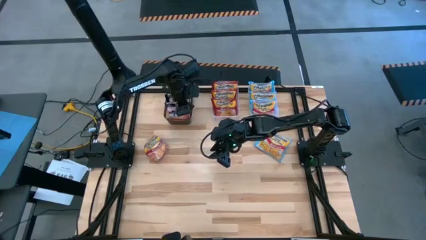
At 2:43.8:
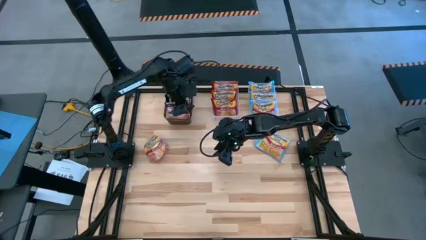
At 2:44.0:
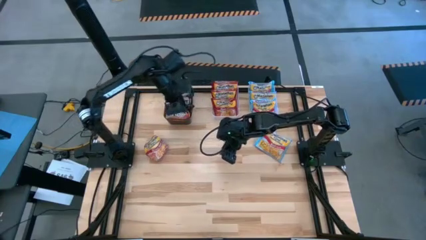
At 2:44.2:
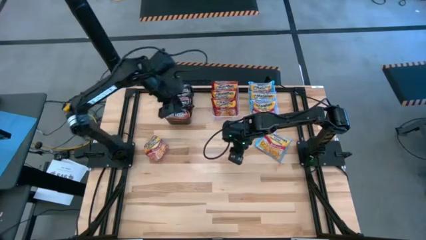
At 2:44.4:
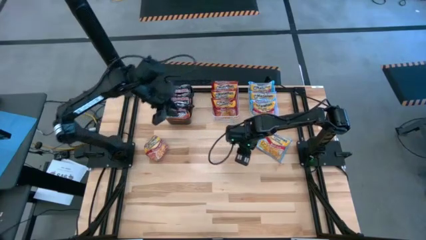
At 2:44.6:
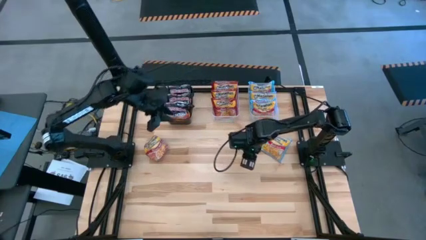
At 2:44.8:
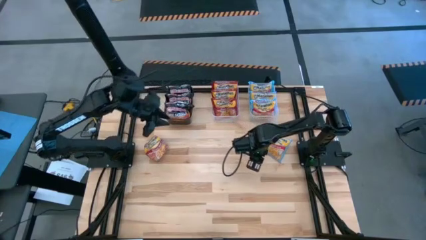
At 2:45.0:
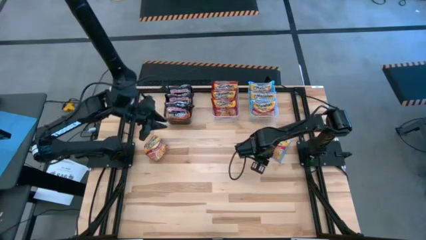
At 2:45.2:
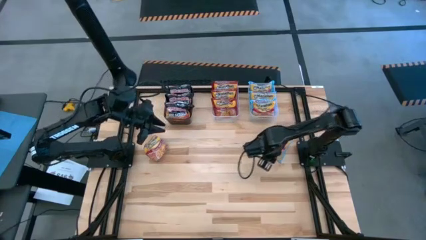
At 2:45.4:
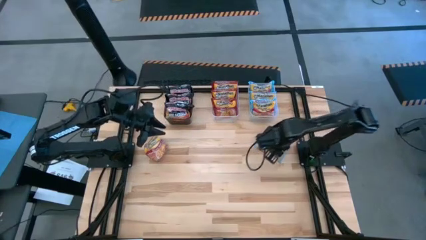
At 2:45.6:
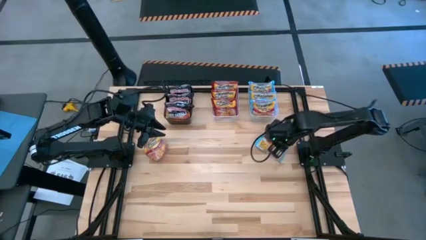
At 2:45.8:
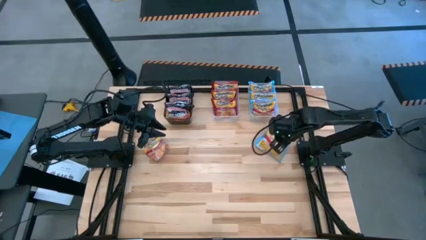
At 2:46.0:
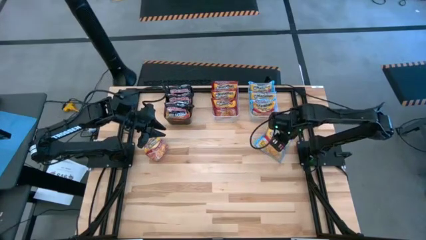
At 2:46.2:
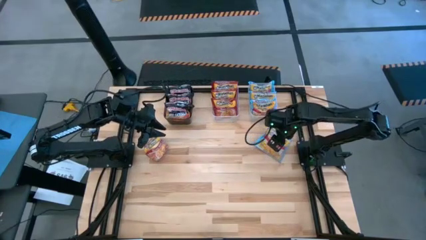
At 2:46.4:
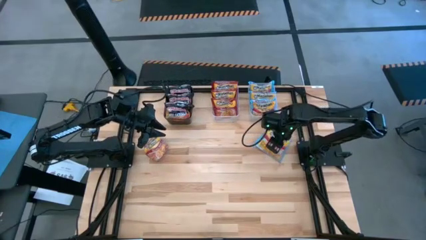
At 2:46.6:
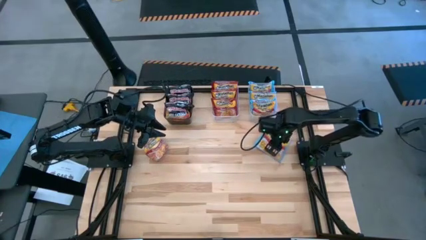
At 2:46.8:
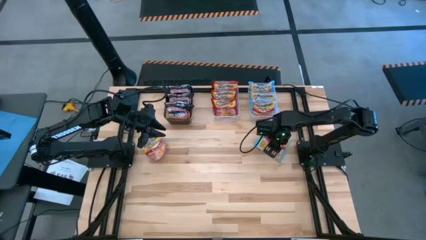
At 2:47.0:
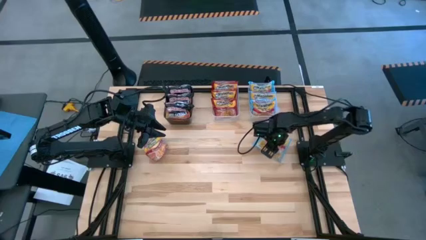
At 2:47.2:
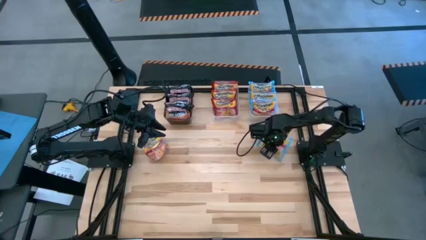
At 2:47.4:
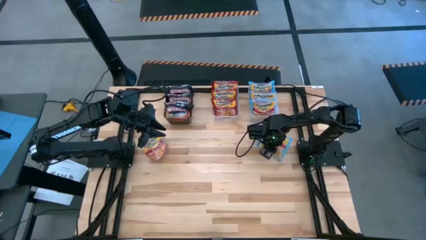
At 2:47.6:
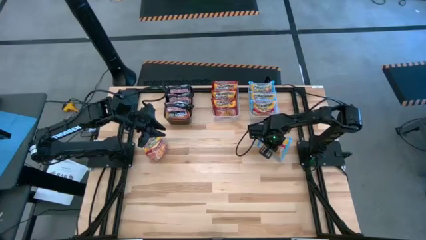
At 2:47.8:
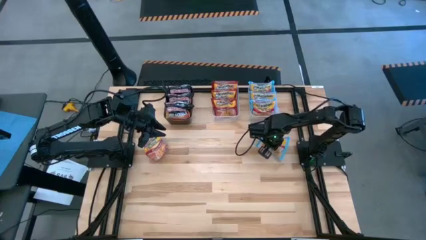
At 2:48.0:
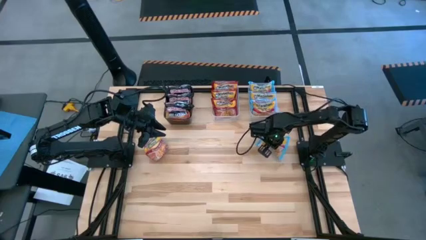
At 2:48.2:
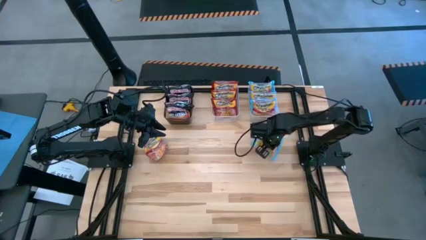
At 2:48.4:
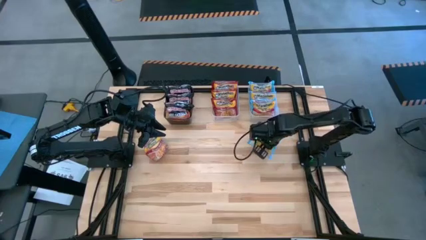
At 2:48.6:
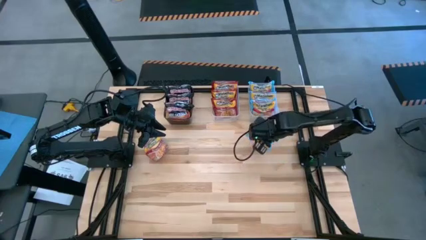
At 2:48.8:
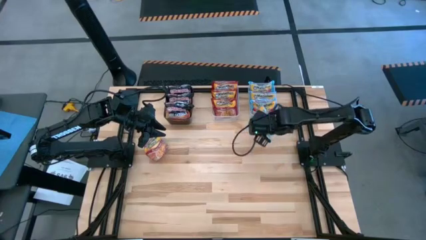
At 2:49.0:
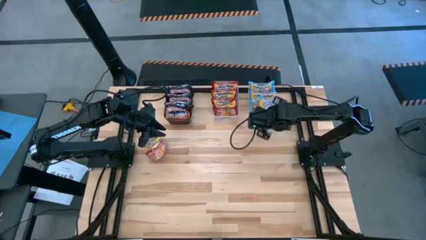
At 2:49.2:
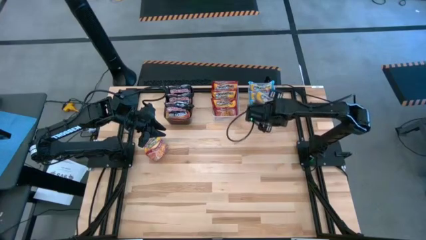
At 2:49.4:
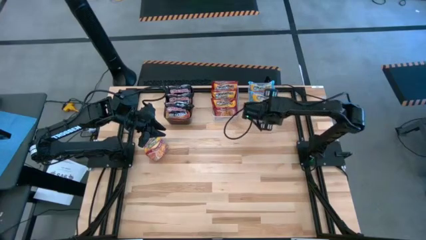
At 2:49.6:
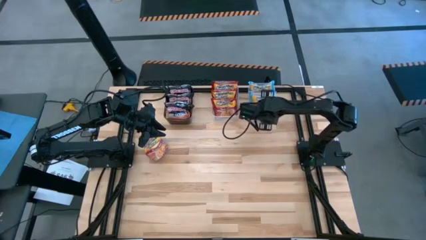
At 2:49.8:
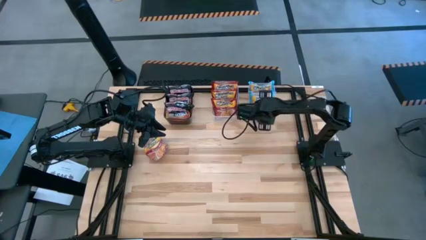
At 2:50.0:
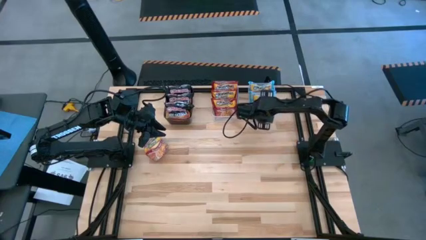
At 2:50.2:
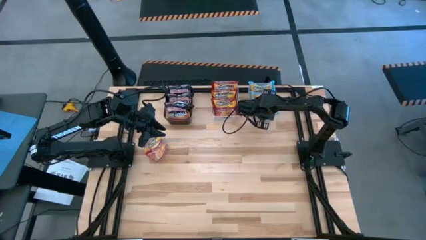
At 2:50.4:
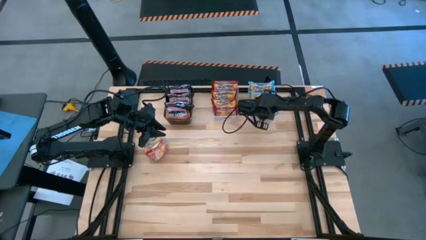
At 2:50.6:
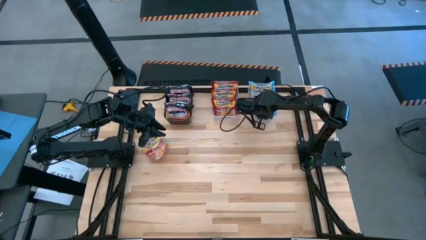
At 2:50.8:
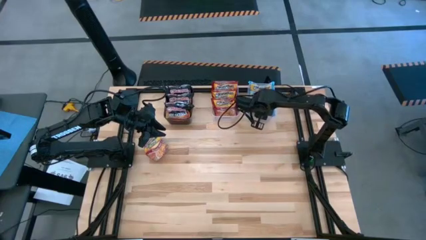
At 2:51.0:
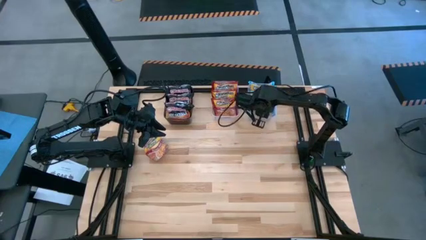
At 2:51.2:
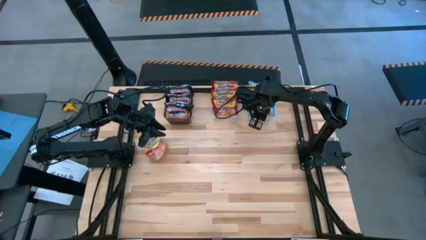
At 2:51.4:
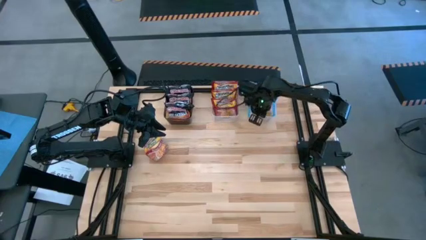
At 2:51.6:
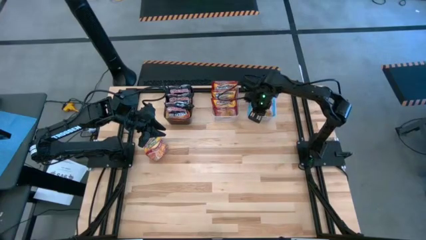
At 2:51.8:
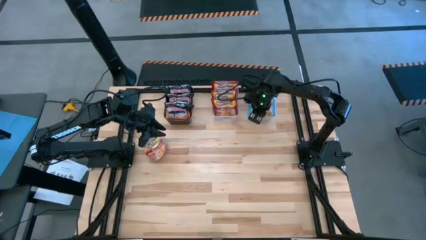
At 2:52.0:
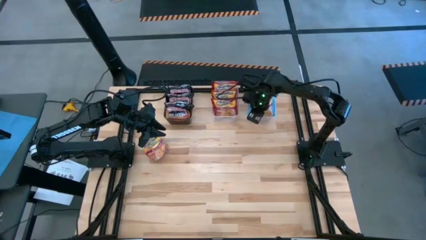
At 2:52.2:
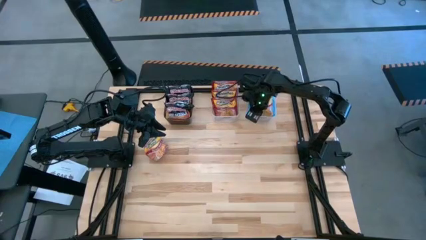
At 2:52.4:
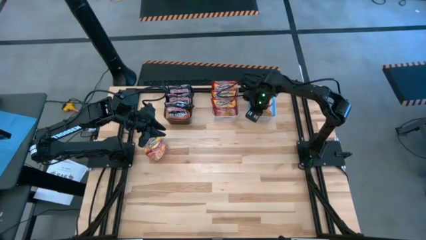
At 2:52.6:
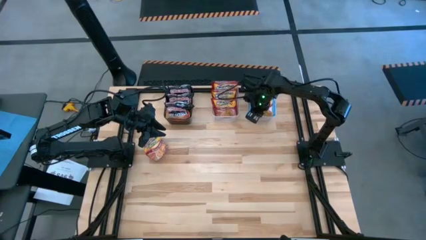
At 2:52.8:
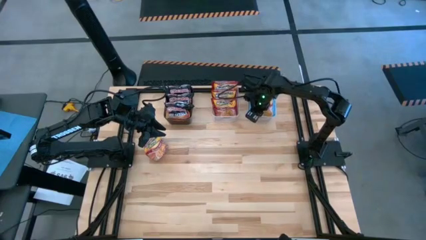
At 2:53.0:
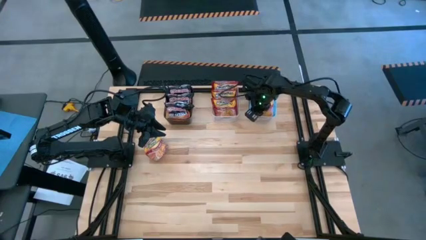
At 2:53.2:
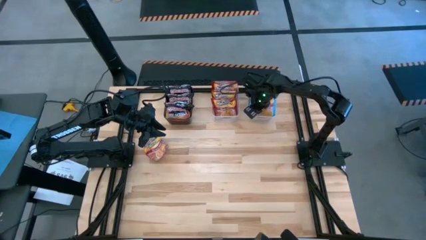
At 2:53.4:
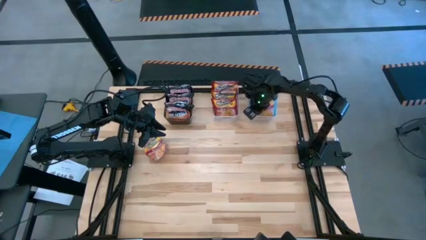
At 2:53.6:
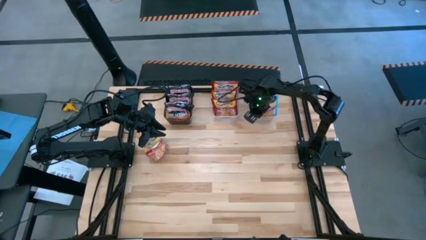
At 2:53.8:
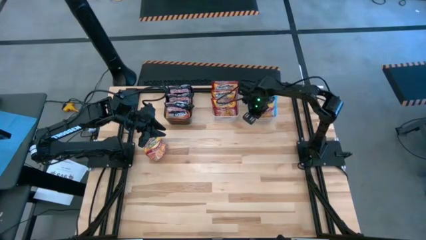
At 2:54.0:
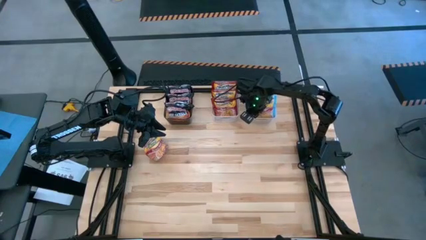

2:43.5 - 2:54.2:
Task: Sort Maruchan noodles
Put the light blue noodle pack into the right transparent bin
